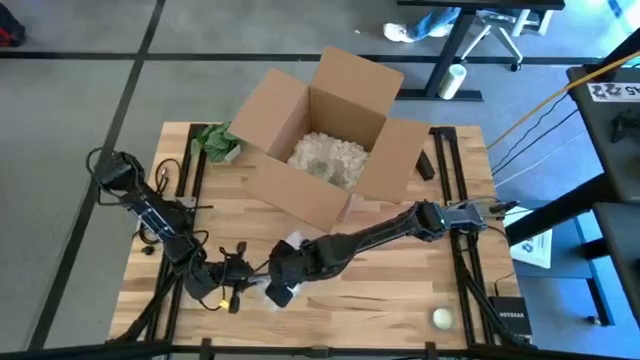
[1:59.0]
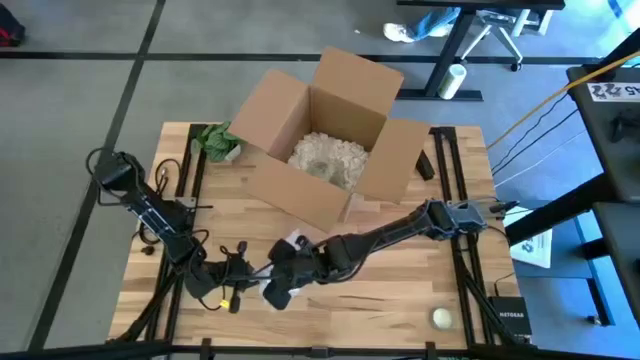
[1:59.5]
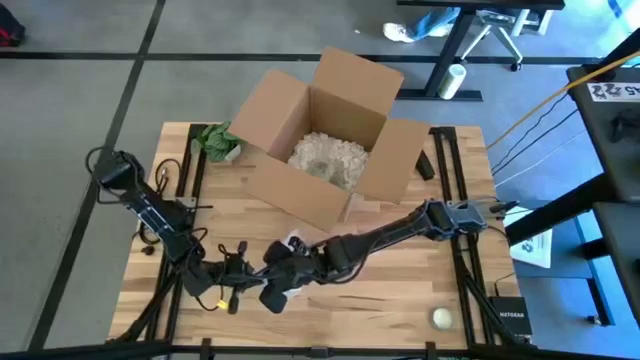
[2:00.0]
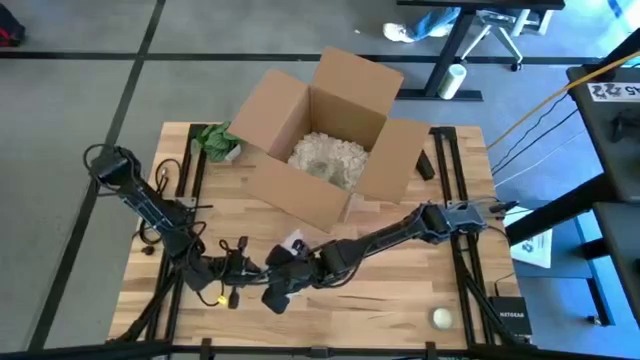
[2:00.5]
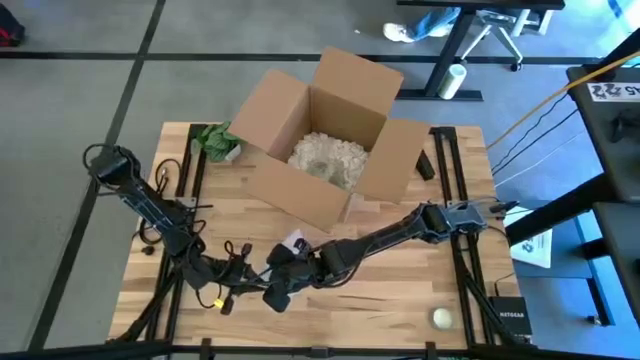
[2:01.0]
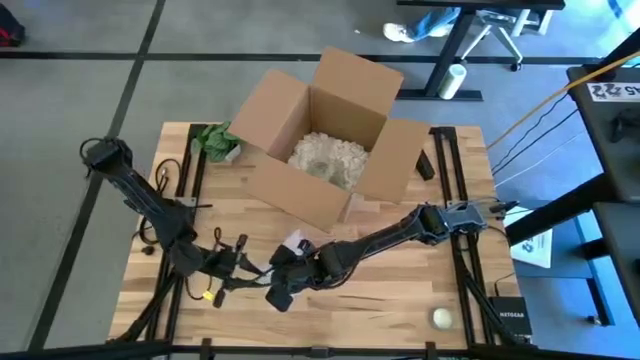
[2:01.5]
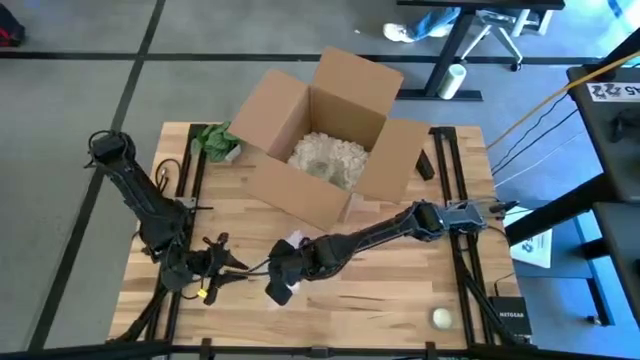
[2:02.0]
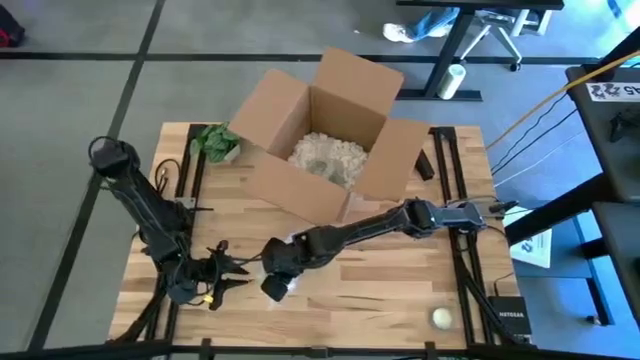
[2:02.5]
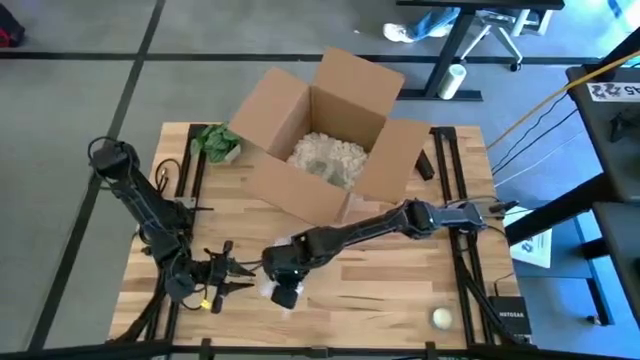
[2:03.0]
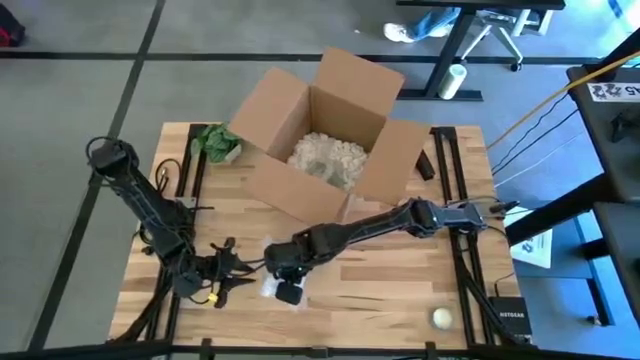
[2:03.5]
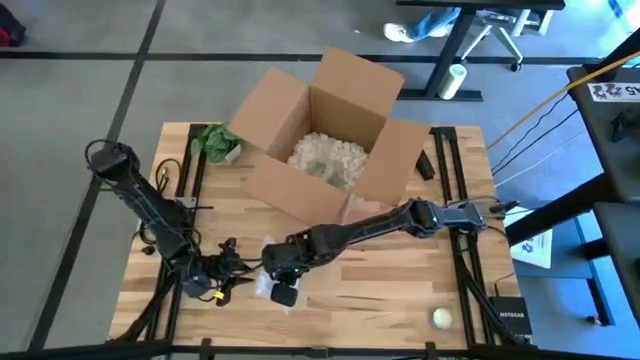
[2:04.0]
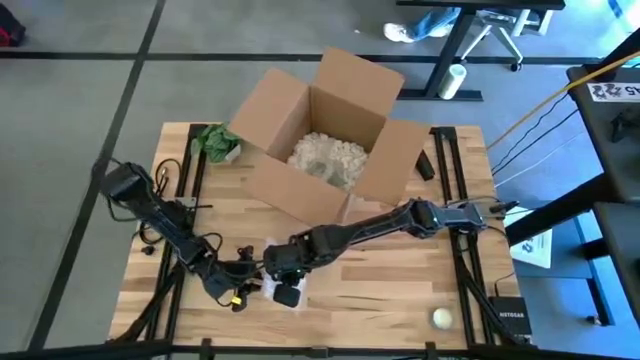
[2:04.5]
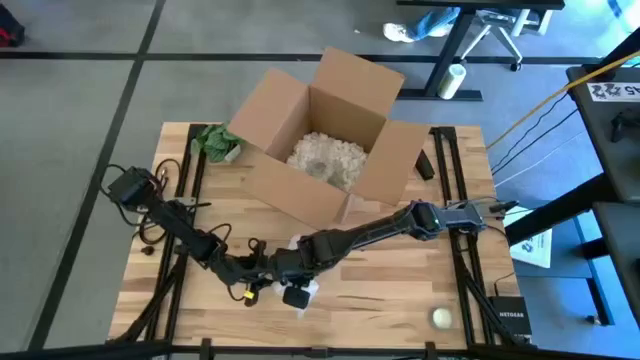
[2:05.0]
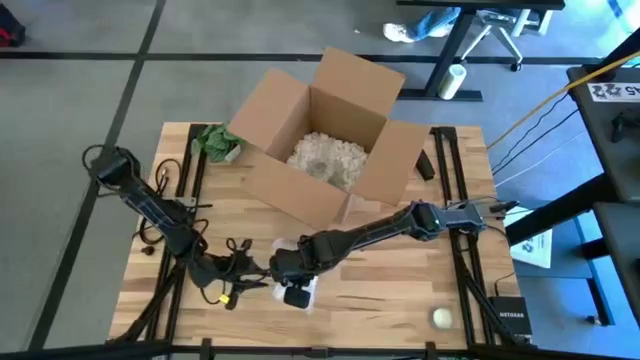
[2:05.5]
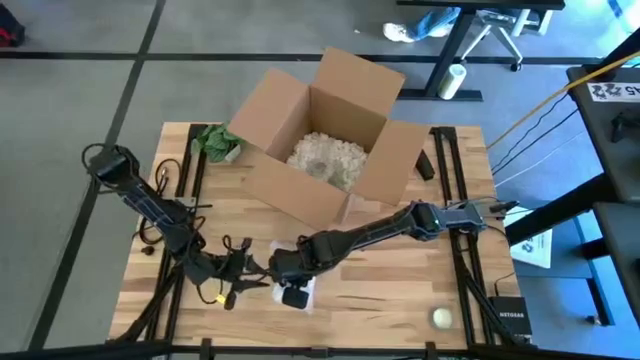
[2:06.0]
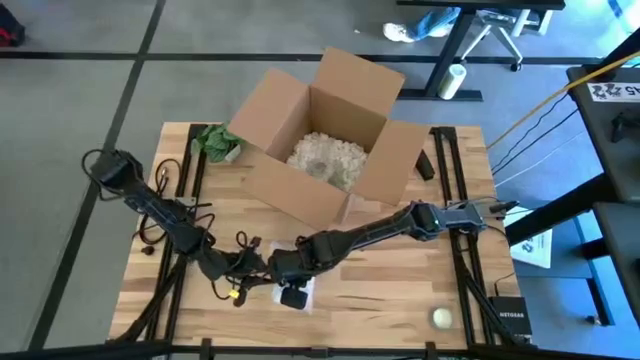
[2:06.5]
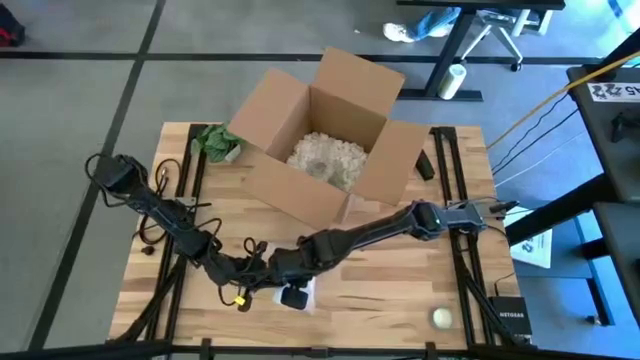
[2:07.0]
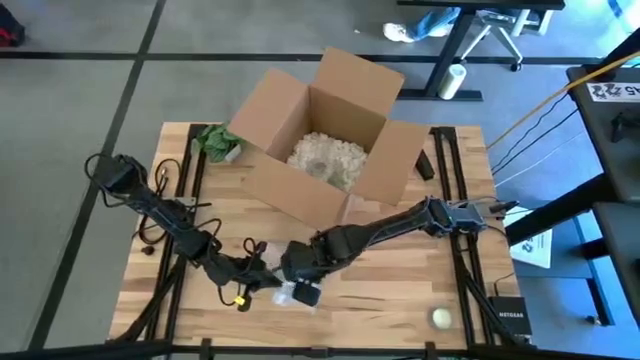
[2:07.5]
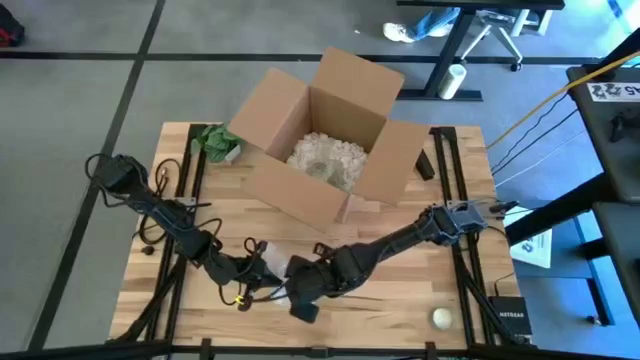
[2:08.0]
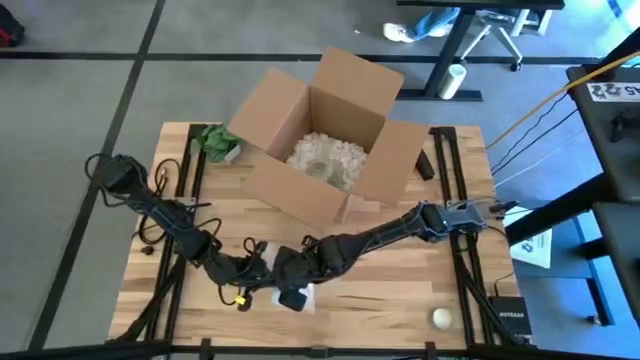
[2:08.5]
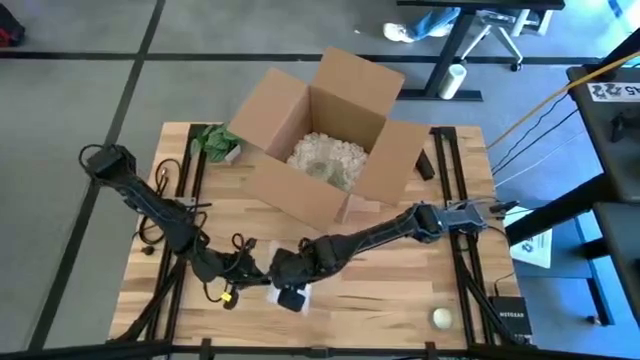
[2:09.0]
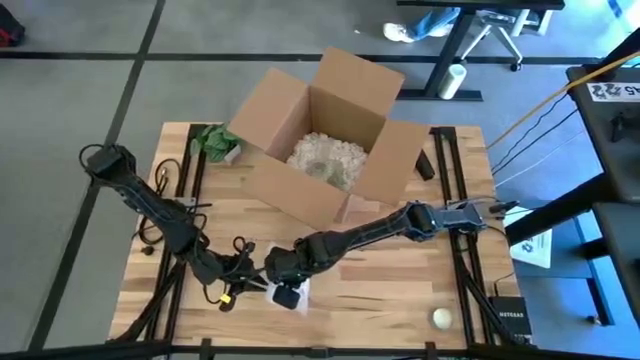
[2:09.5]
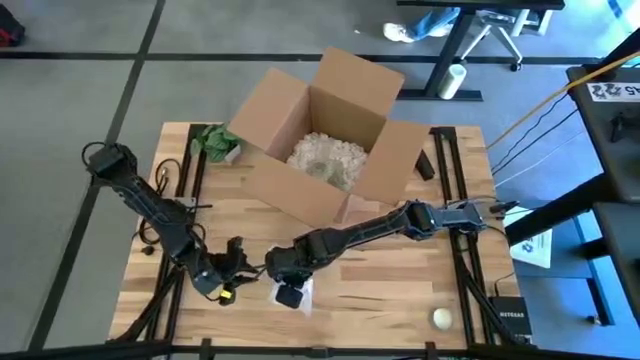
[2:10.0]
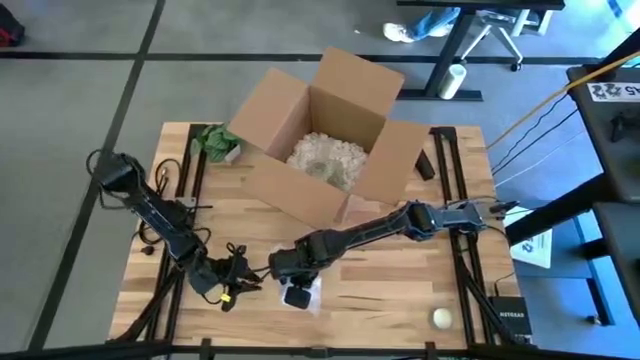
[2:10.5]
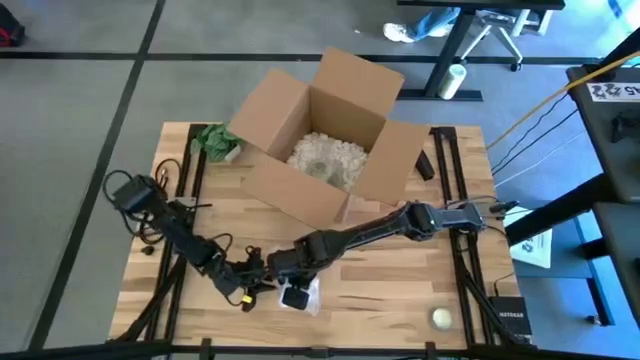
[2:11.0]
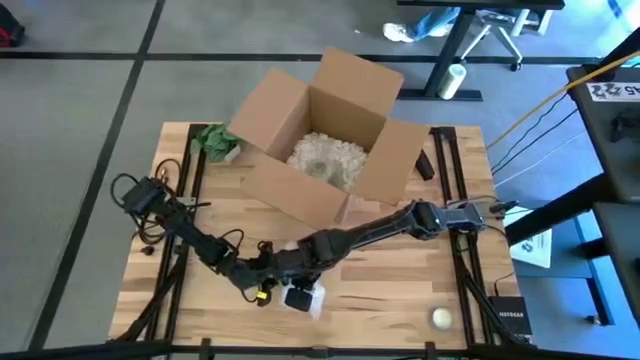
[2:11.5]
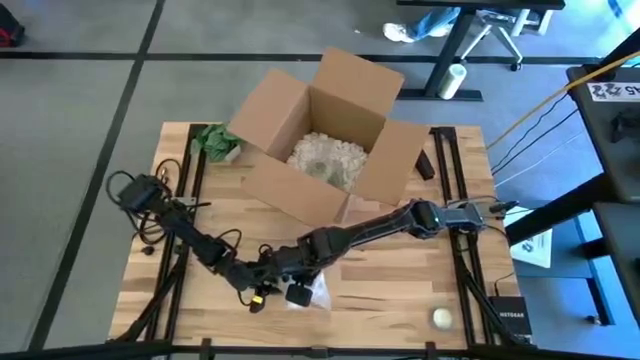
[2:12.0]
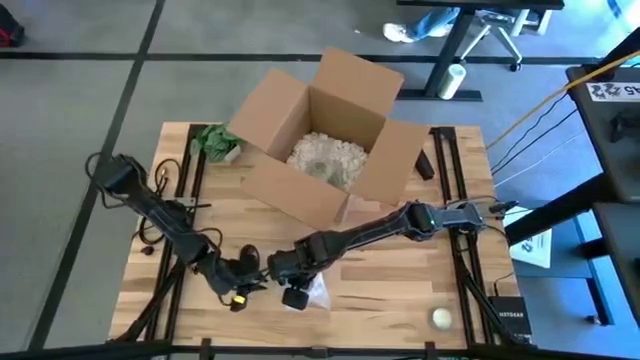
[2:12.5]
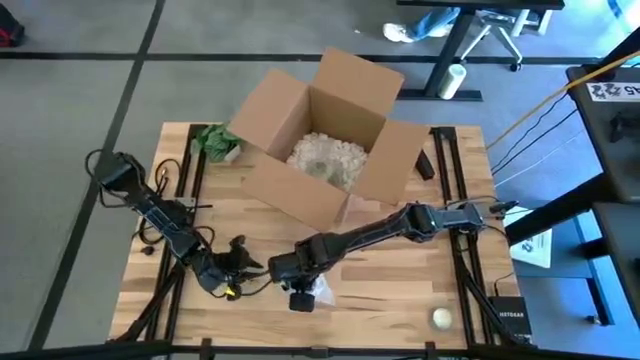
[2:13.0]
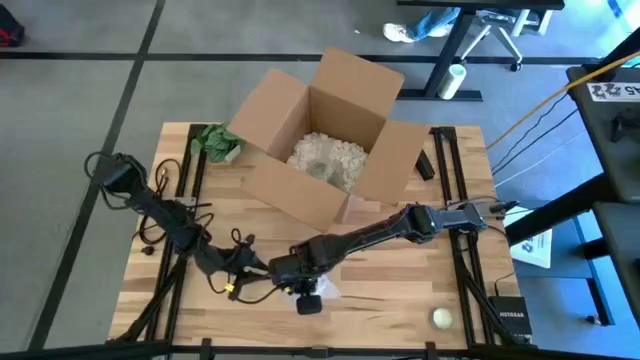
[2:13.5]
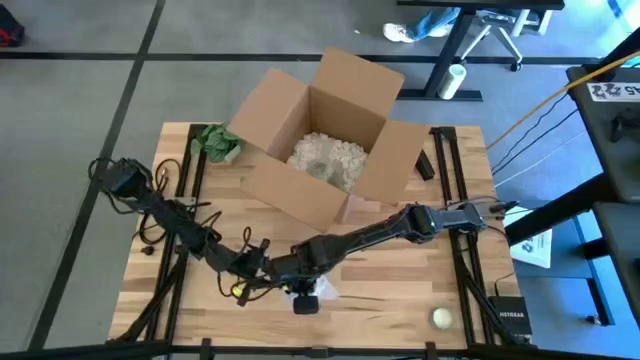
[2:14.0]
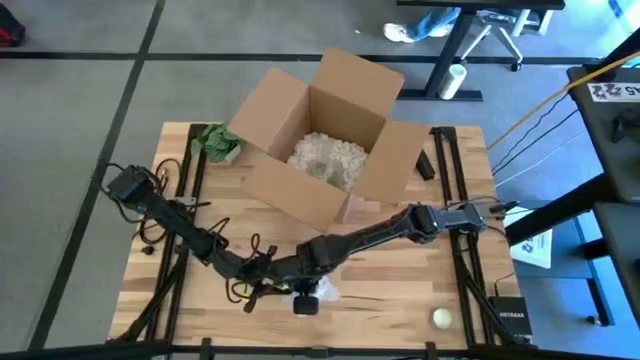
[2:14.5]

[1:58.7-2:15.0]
Task: wrap mug
Wrap the blue mug with the bubble wrap

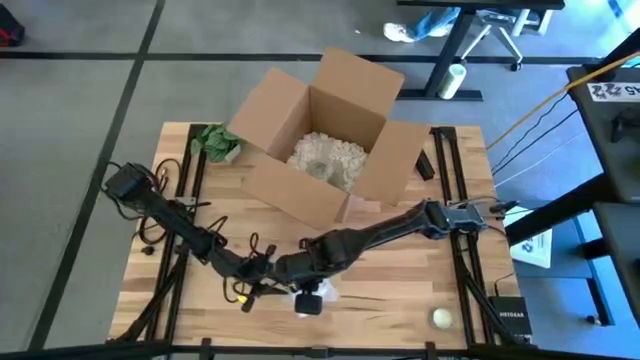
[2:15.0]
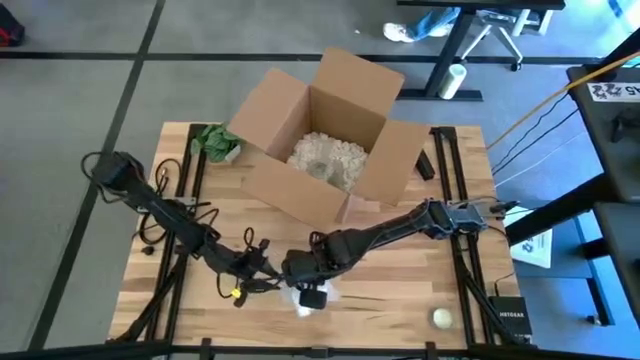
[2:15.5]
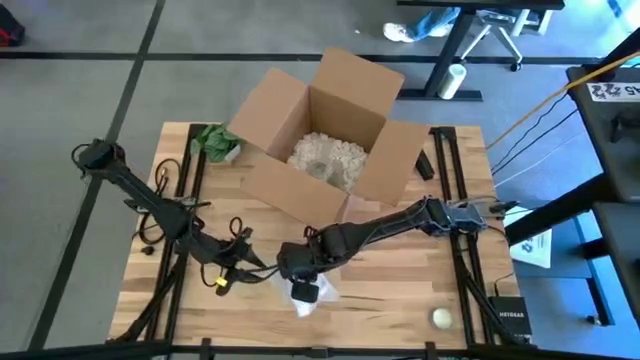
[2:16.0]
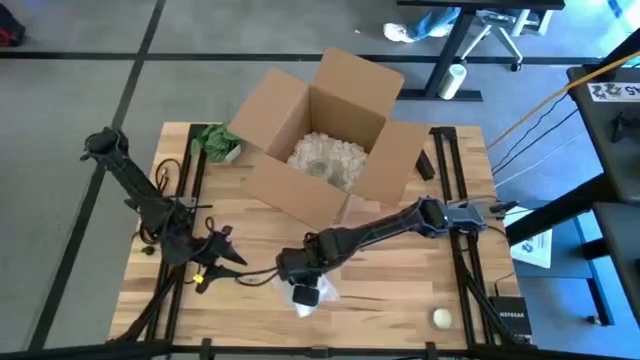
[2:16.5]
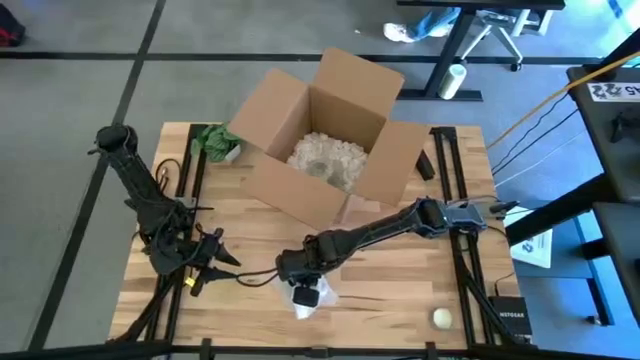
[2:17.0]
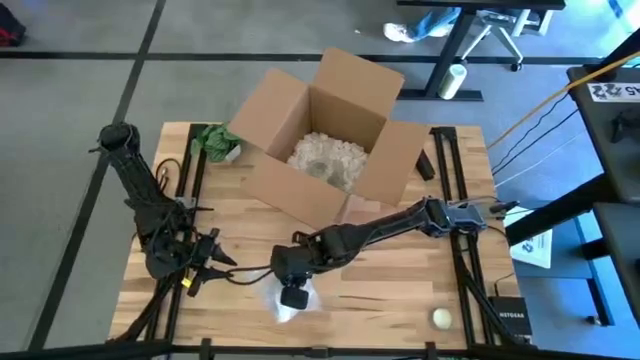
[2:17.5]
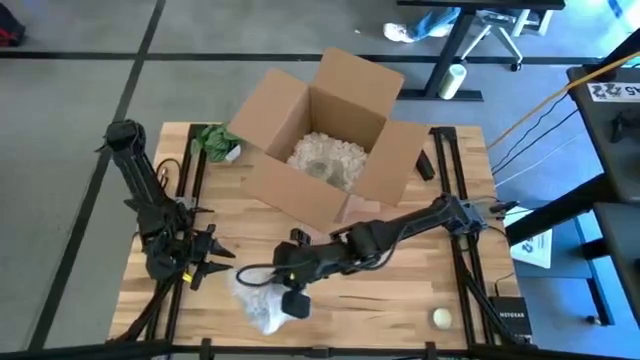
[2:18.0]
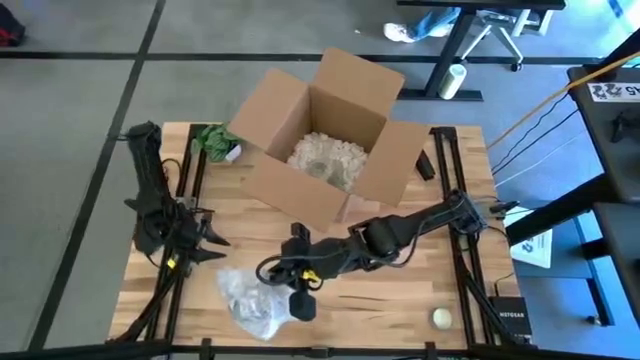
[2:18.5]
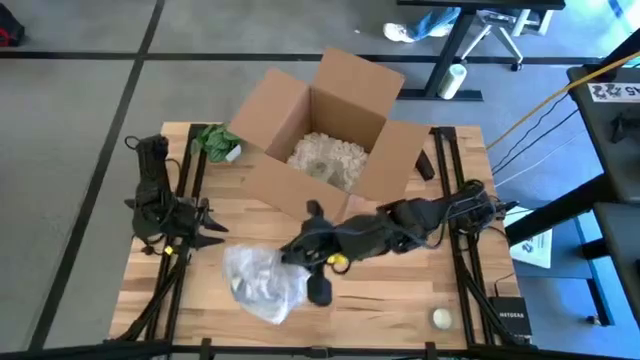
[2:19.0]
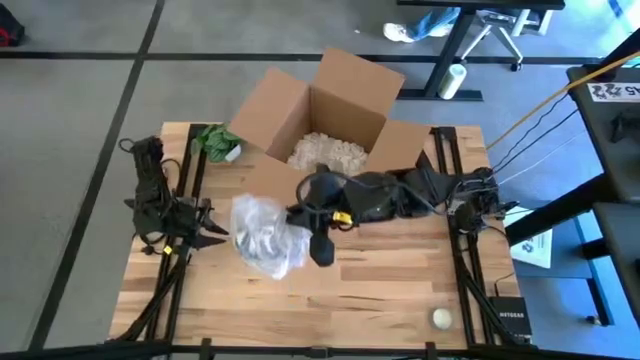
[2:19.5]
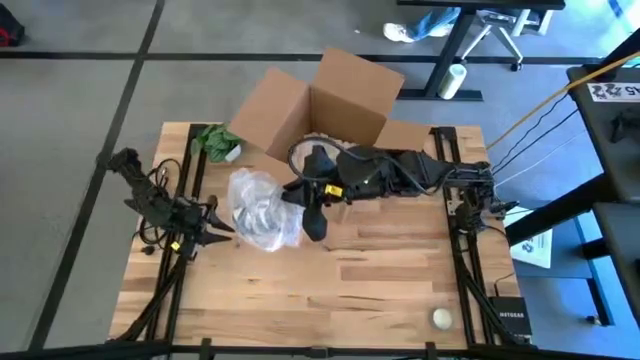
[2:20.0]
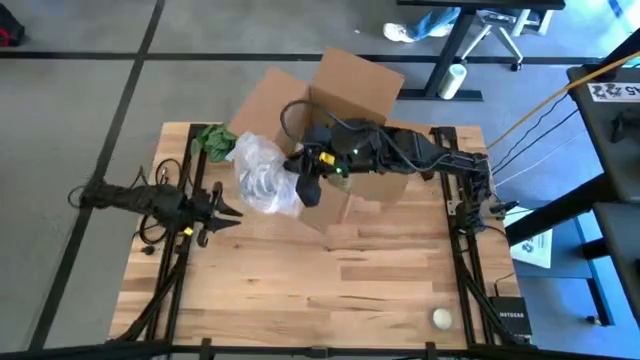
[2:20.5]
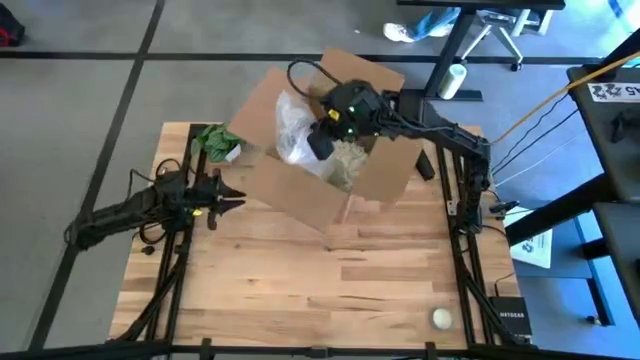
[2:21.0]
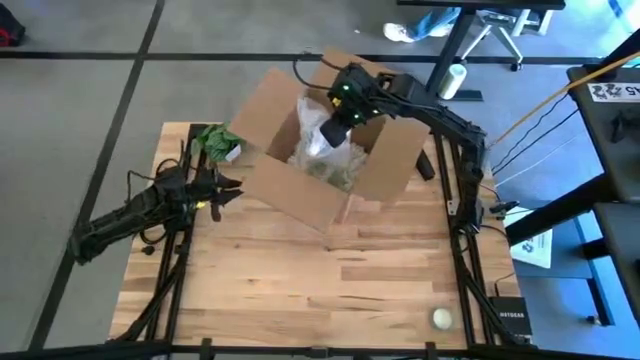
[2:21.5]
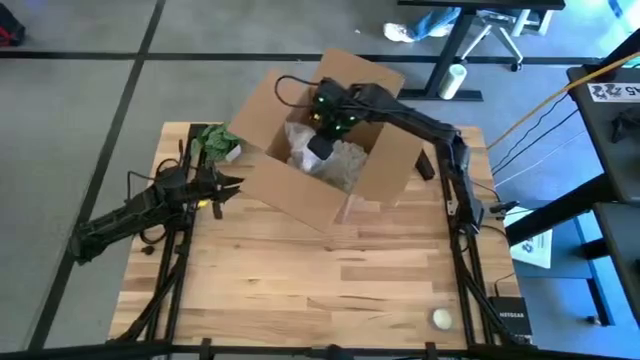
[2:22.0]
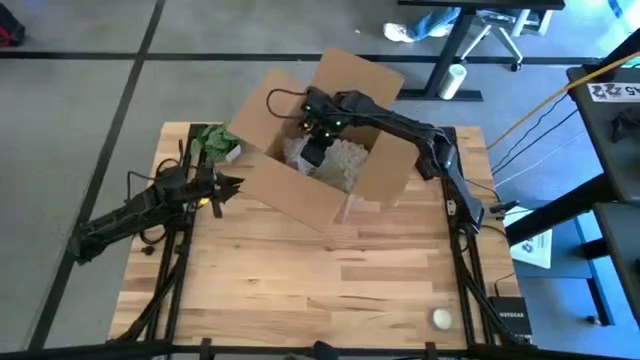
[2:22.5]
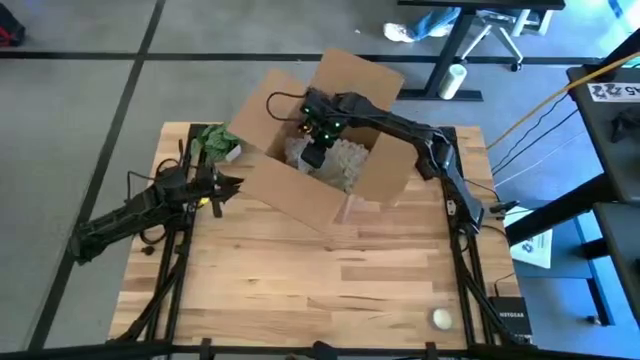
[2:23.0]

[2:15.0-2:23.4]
Put the wrapped blue mug into the box
